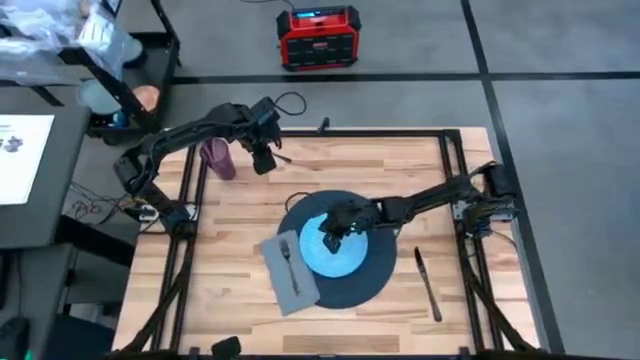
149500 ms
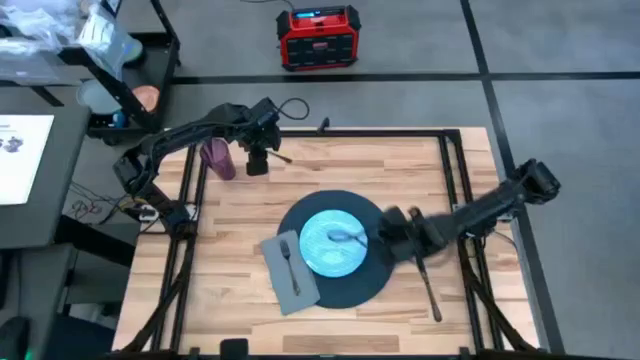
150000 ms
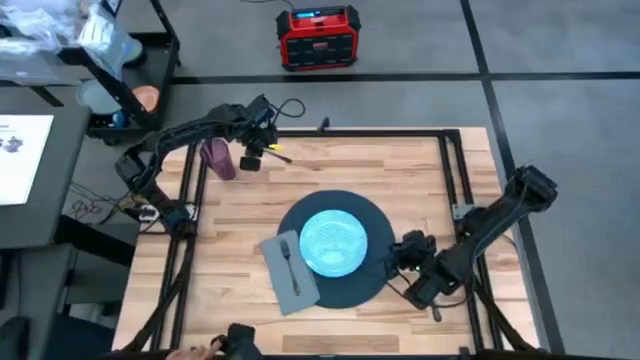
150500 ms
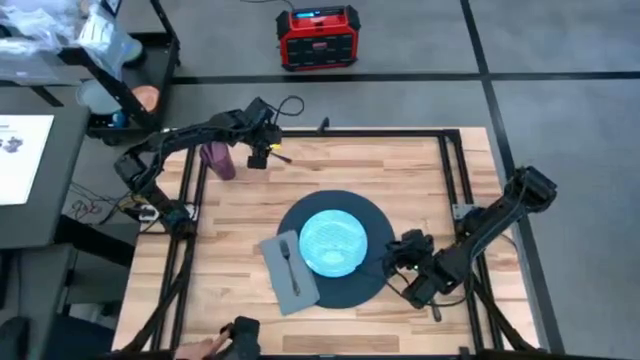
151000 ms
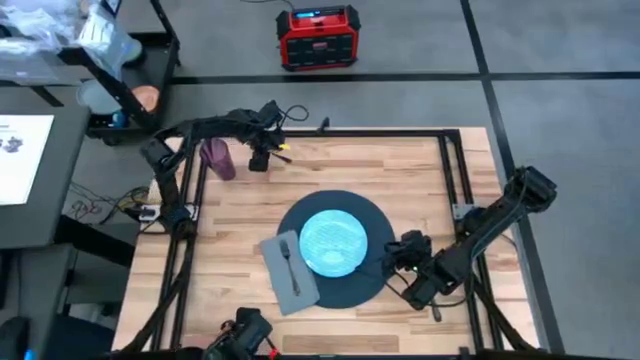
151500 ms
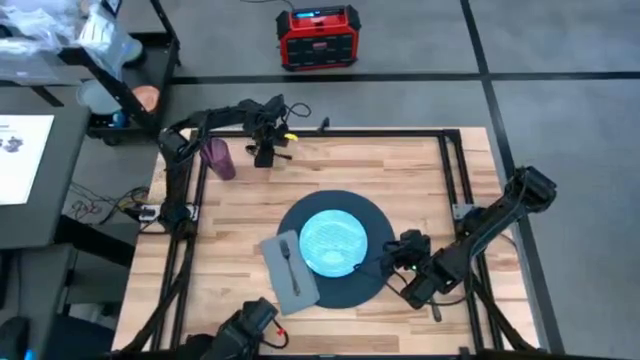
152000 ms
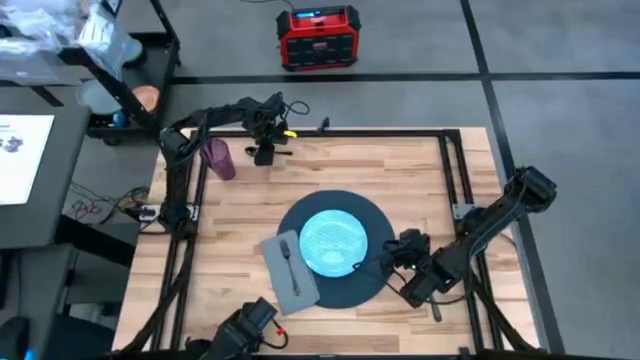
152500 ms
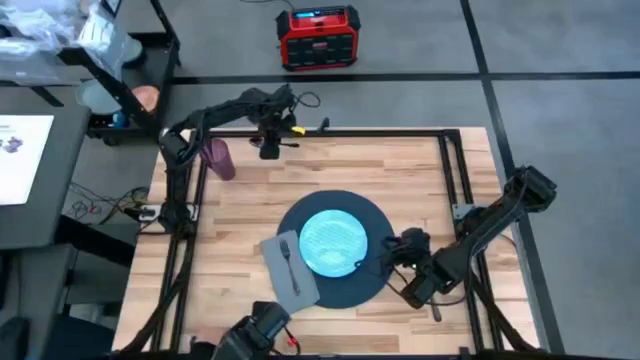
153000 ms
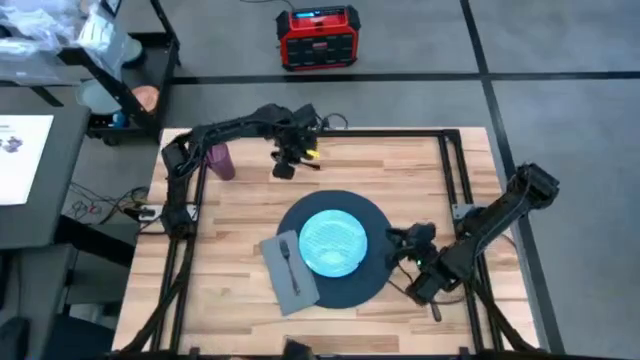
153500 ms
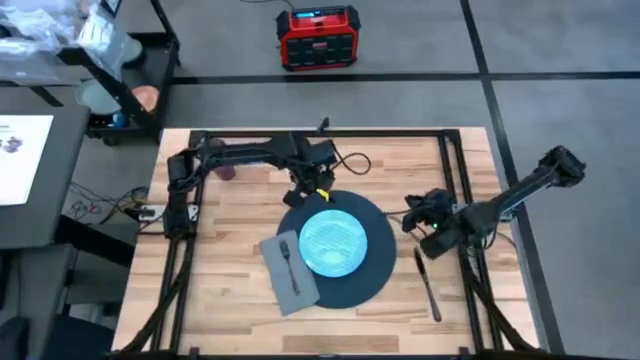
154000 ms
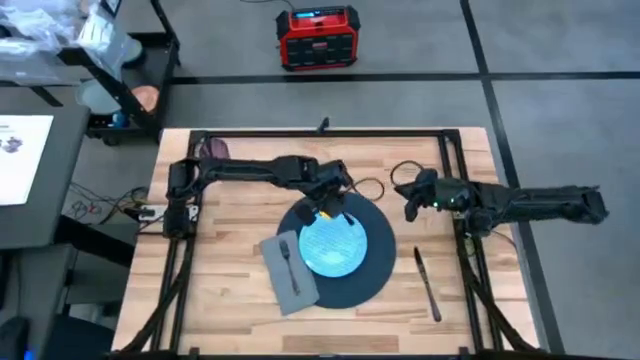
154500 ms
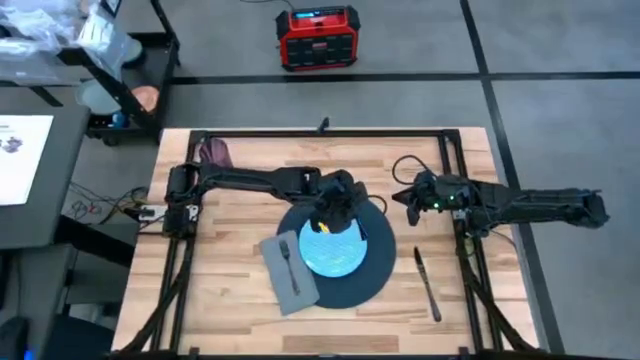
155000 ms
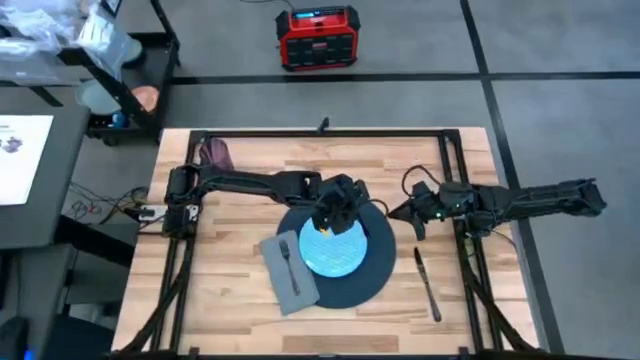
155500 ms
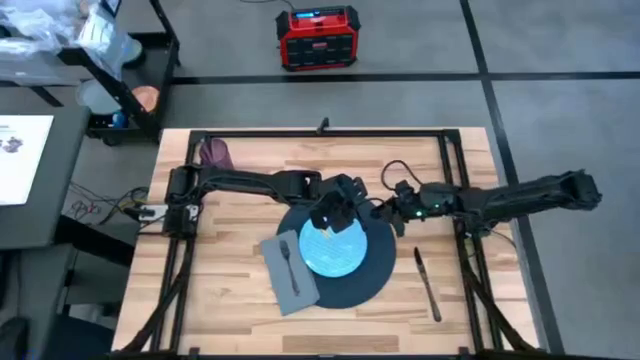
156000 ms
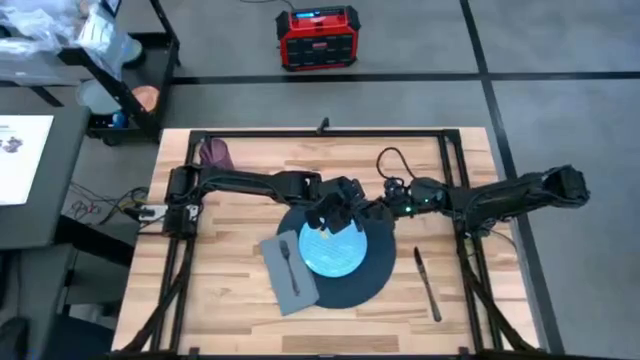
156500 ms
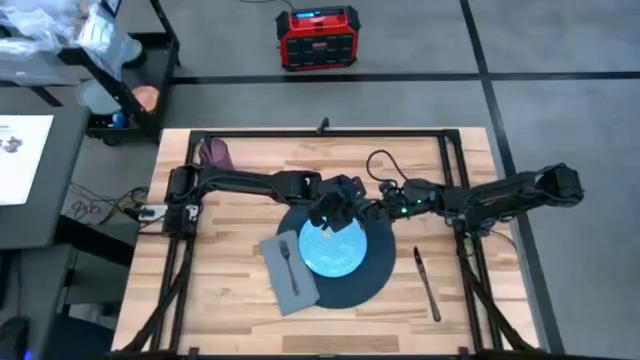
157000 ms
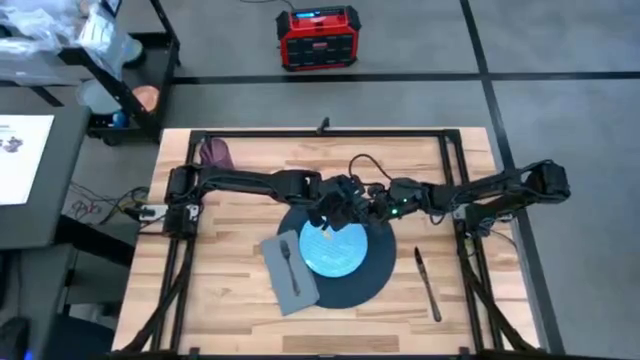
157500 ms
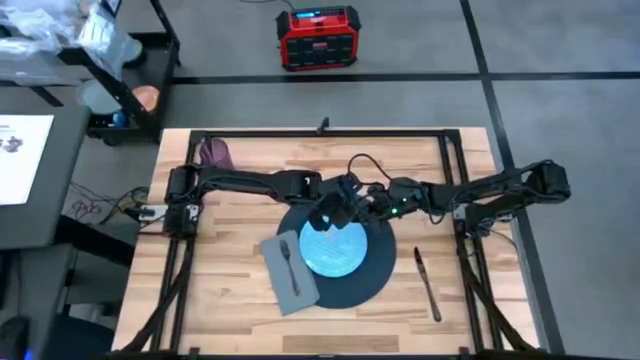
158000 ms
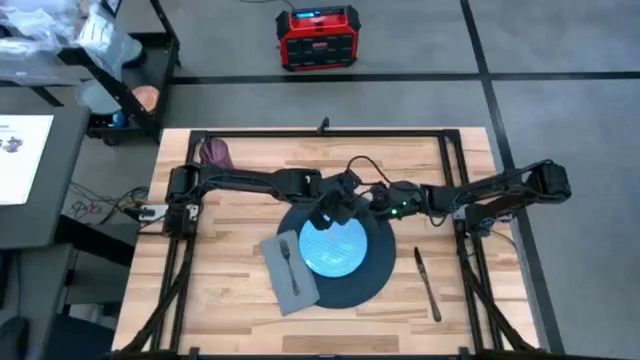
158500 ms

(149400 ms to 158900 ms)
Task: Set table place
Put the black spoon on the dark blue table mat

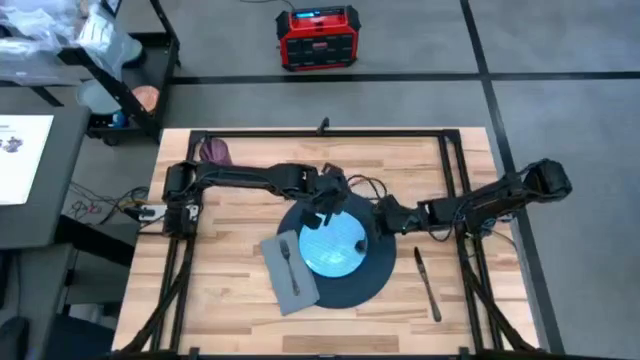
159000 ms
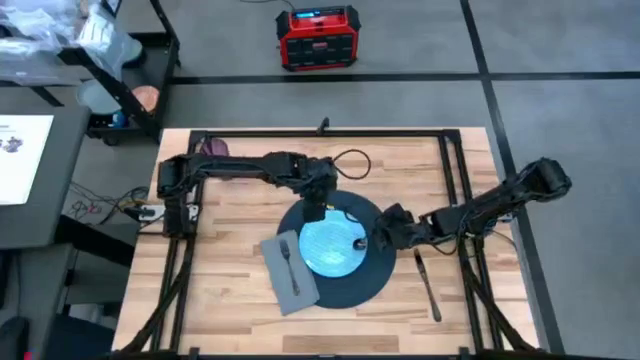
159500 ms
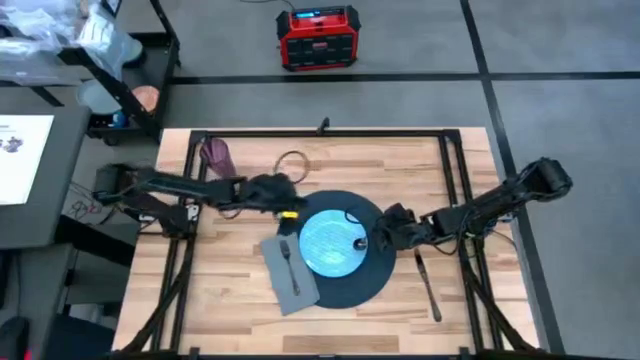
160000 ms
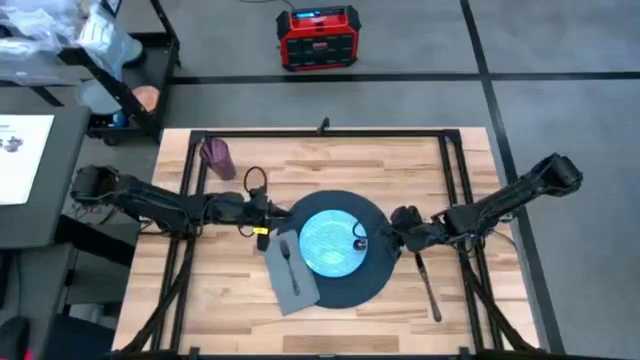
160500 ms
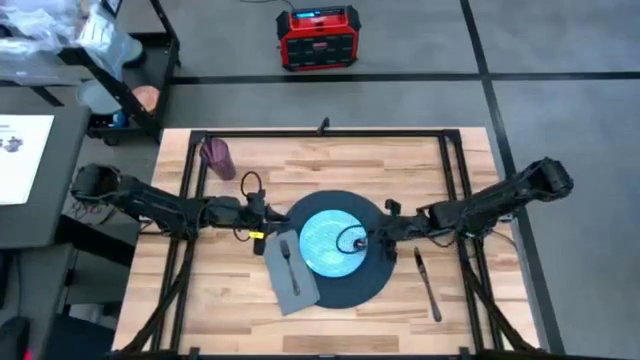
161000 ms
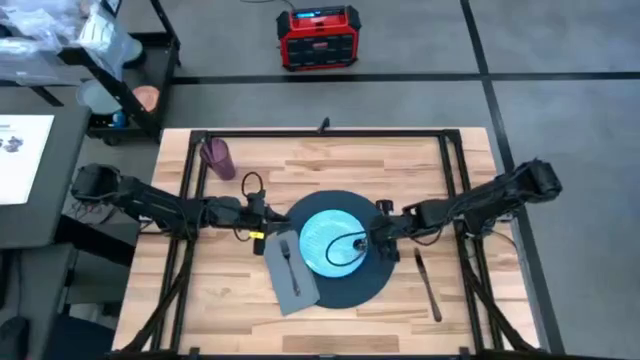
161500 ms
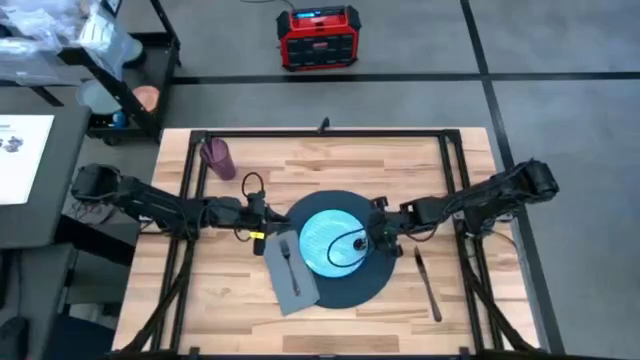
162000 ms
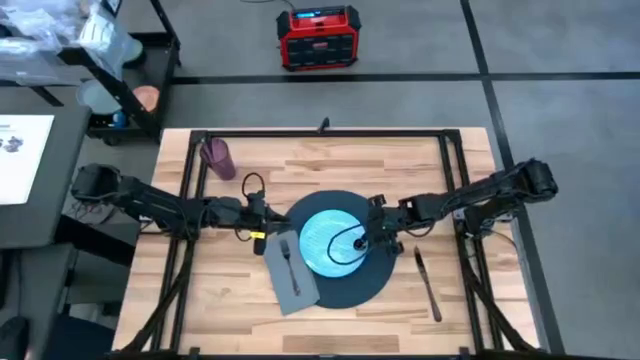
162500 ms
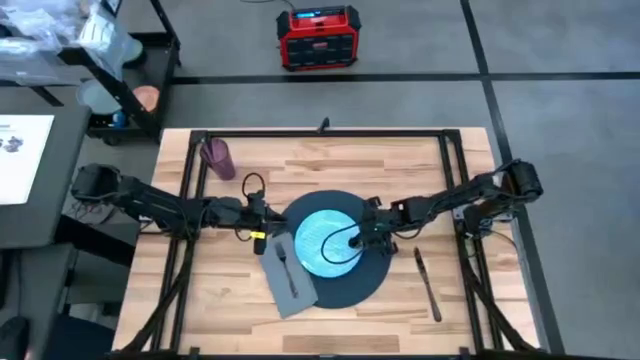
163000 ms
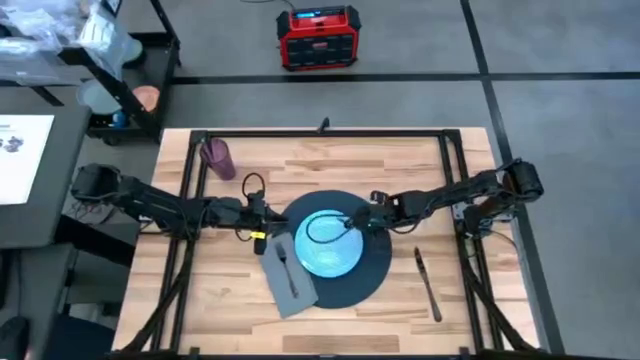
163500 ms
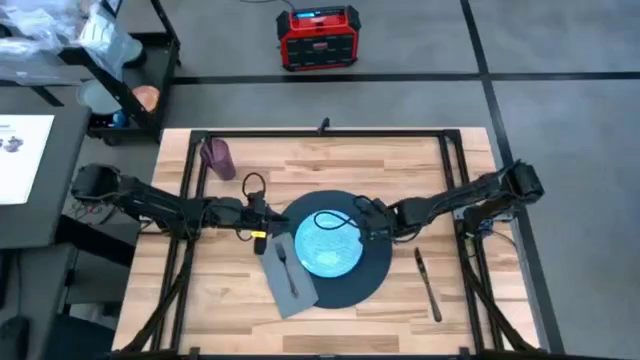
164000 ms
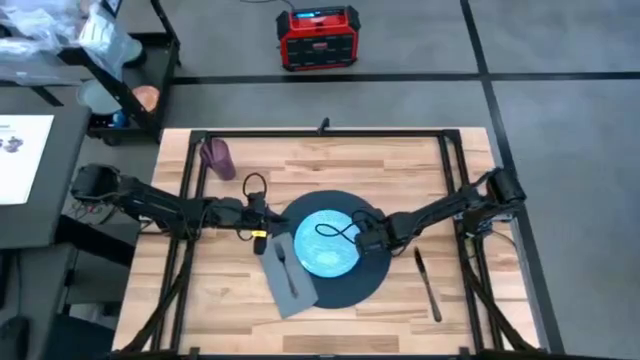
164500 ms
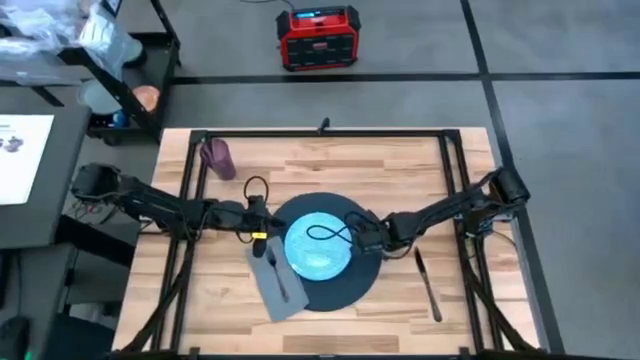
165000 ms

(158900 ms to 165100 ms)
Put the black spoon on the dark blue table mat

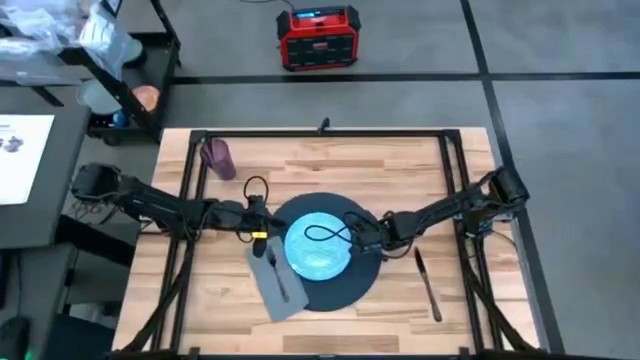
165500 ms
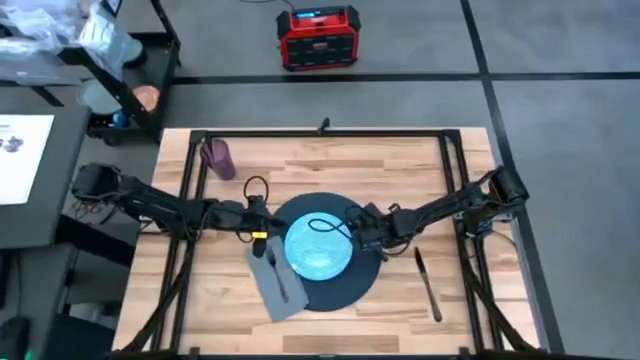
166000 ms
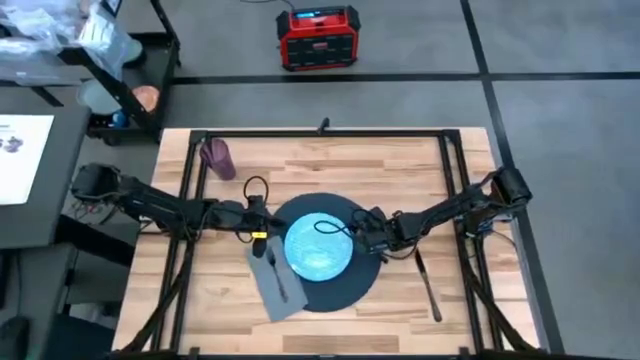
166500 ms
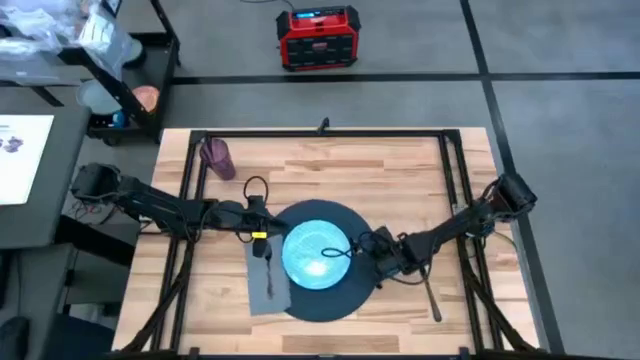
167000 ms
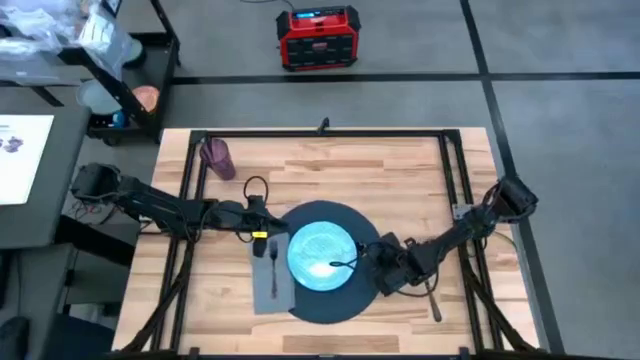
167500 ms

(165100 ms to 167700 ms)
Adjust the dark blue table mat

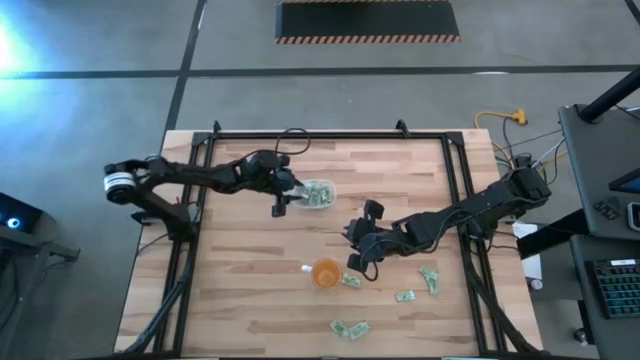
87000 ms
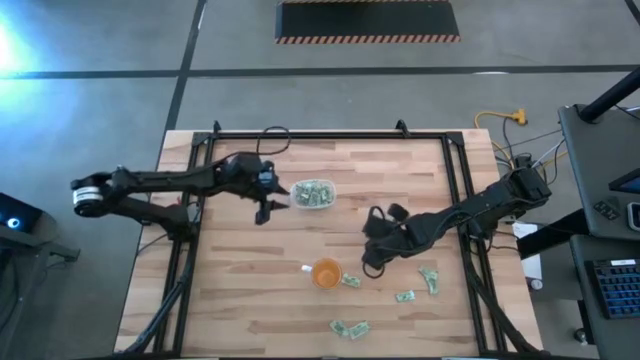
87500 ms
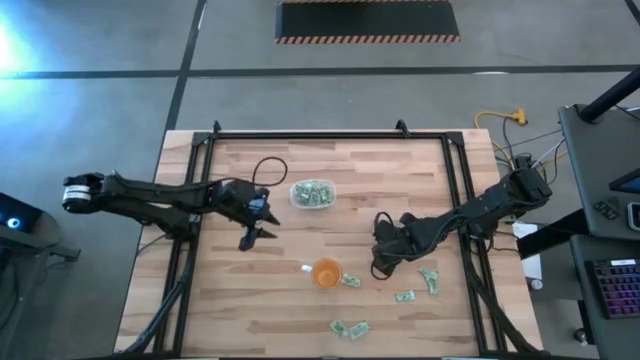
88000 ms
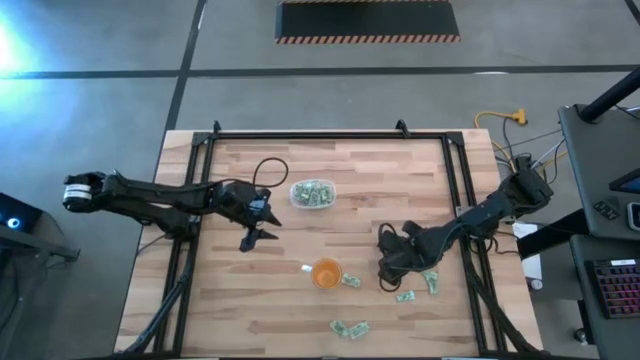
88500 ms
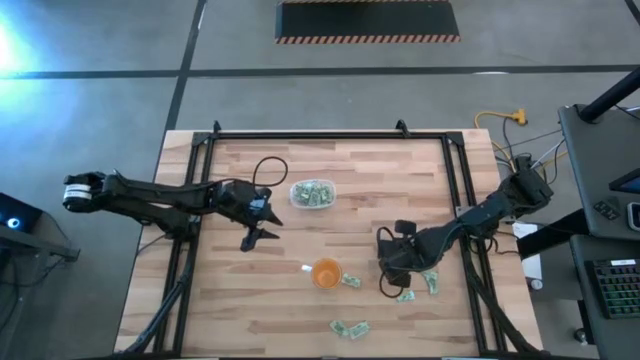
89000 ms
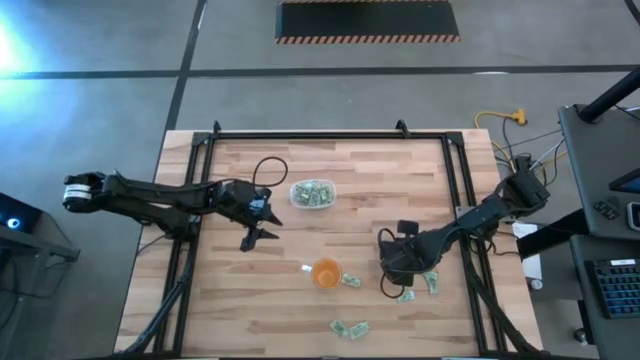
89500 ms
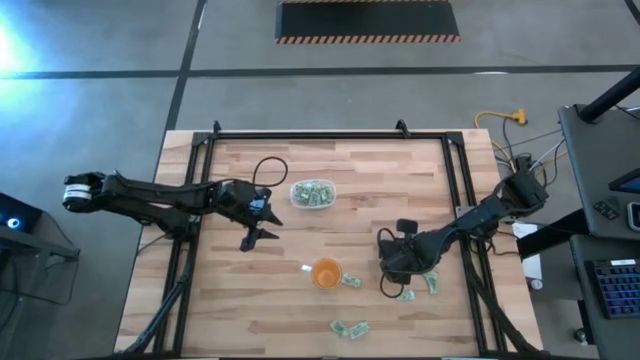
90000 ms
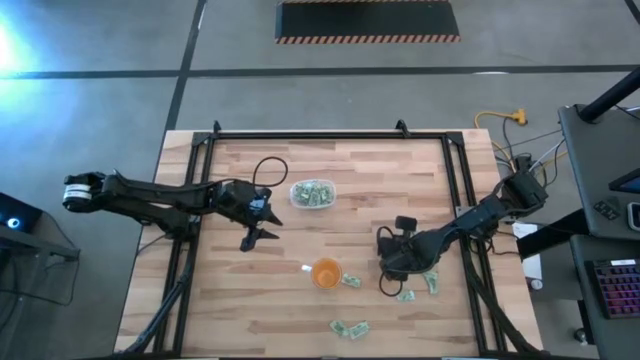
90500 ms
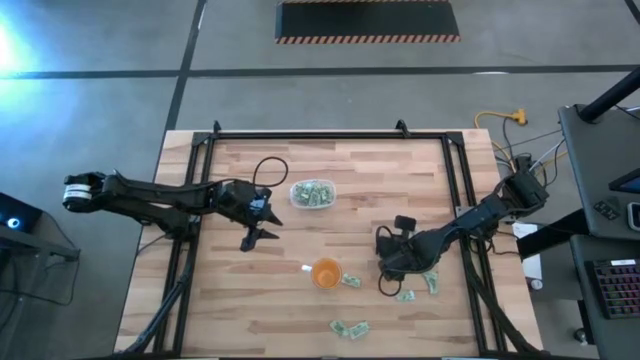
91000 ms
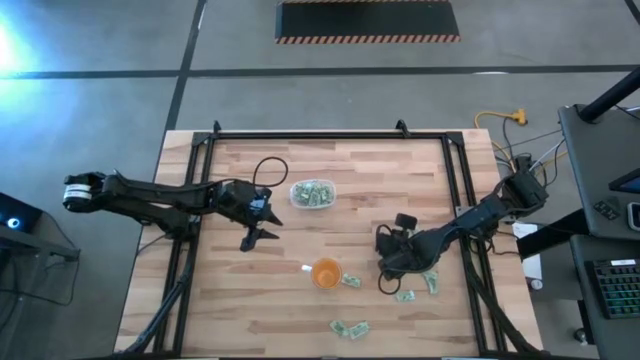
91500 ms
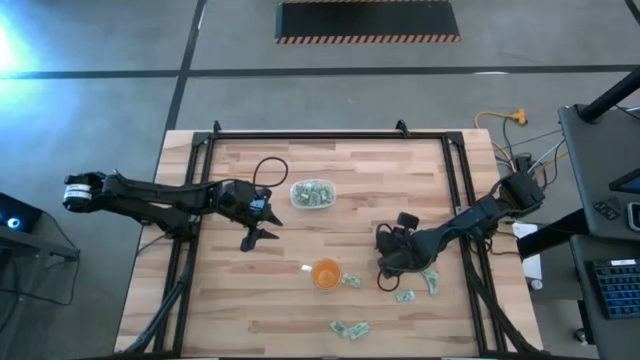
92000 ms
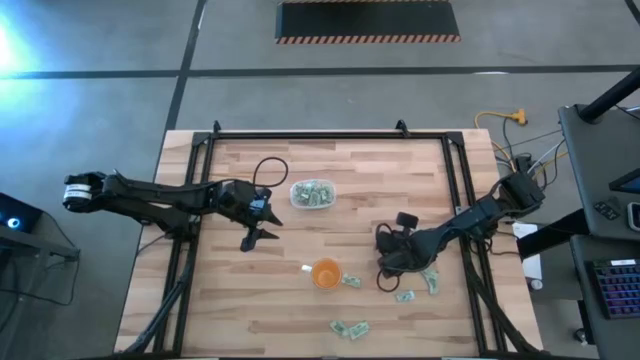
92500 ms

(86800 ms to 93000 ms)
Task: Pick and place Stevia / Truvia into bins
Put the stevia packet into the transparent bin
